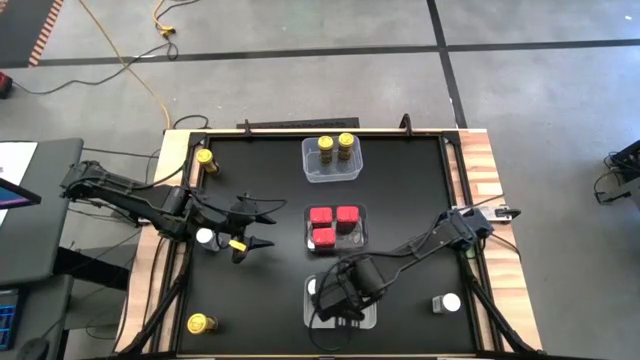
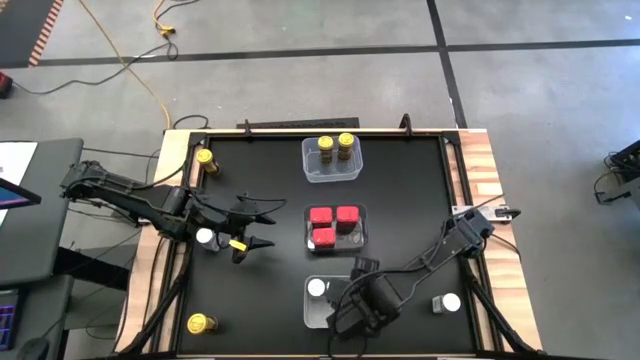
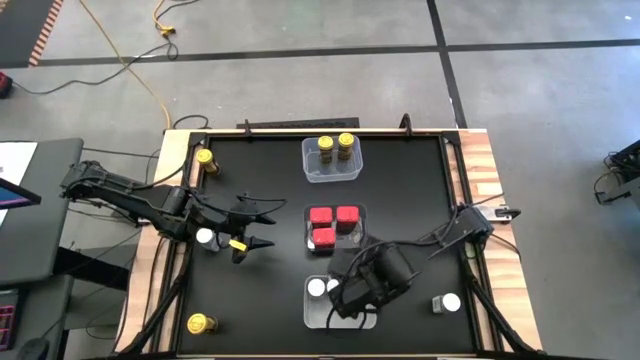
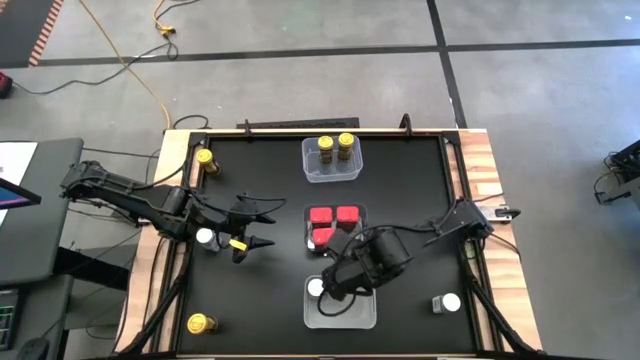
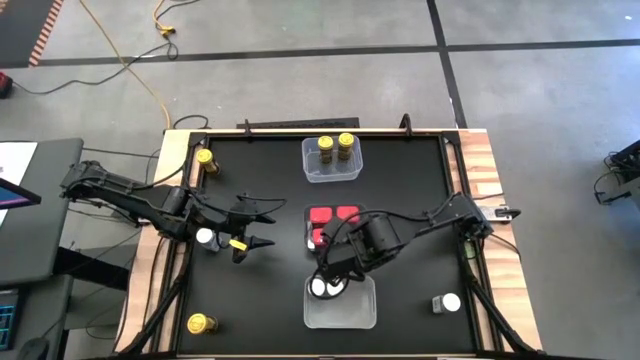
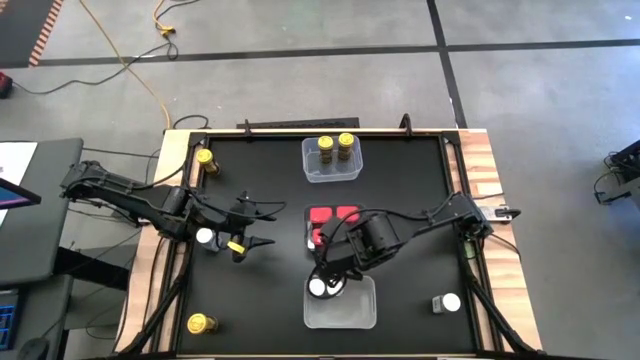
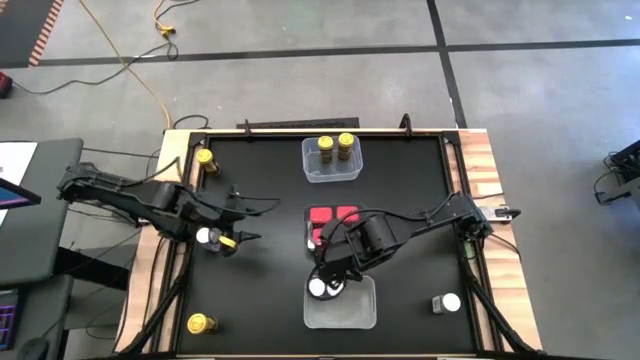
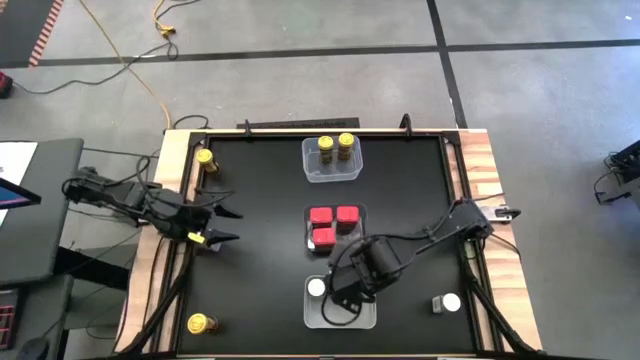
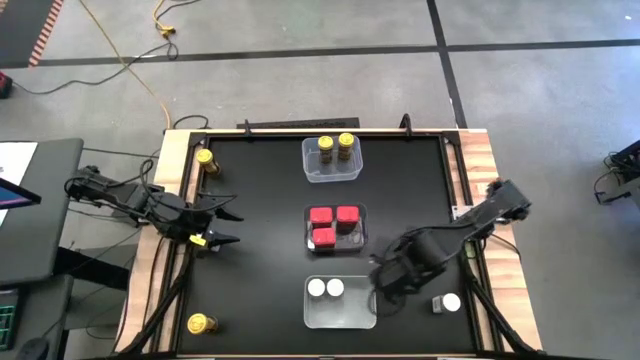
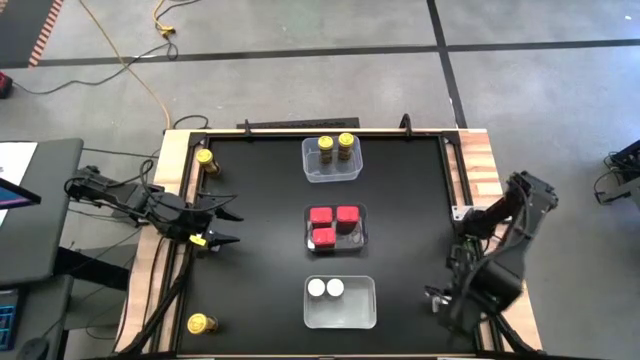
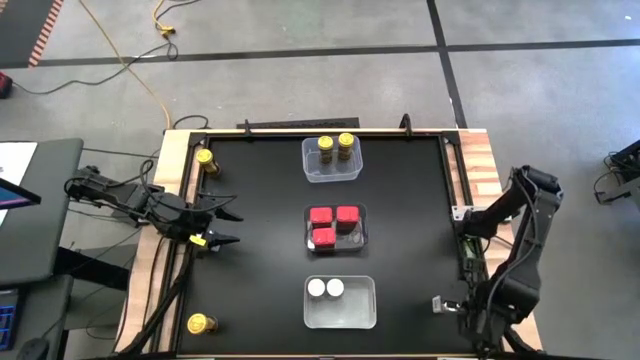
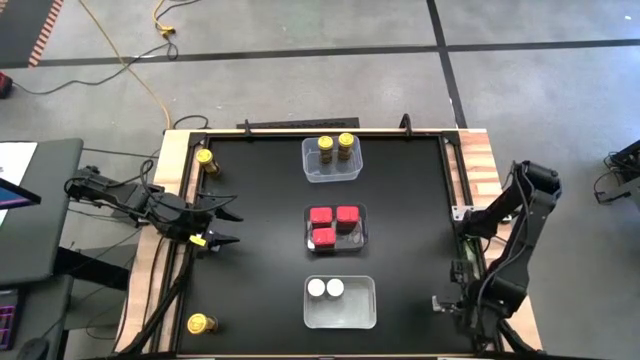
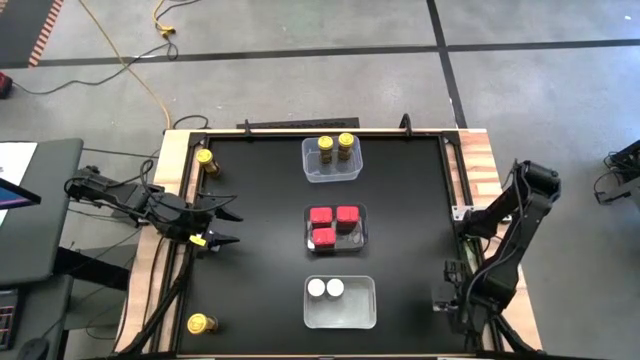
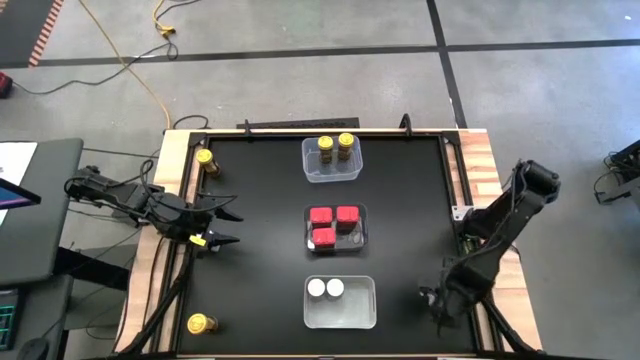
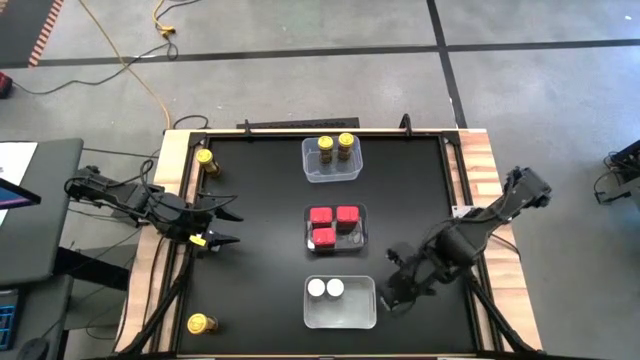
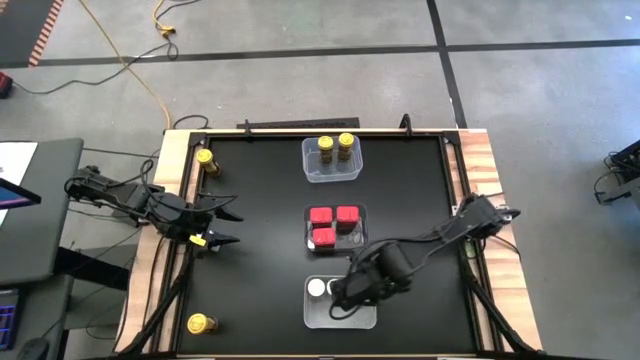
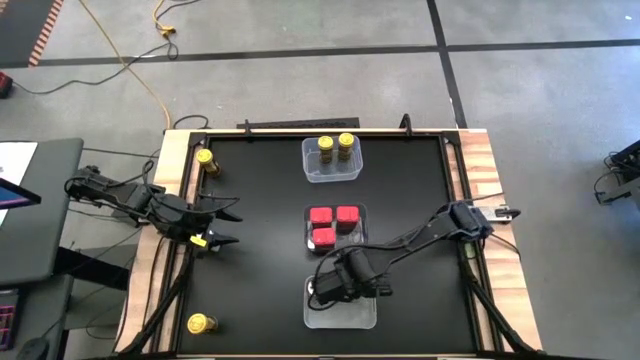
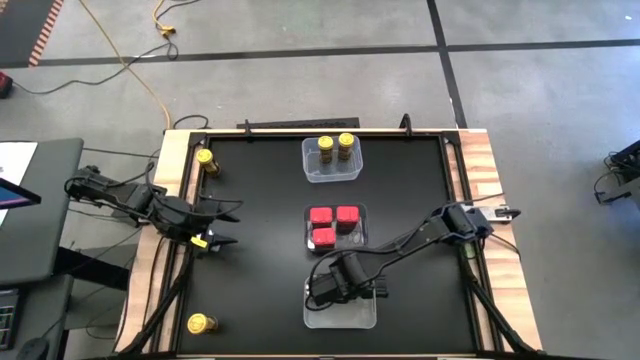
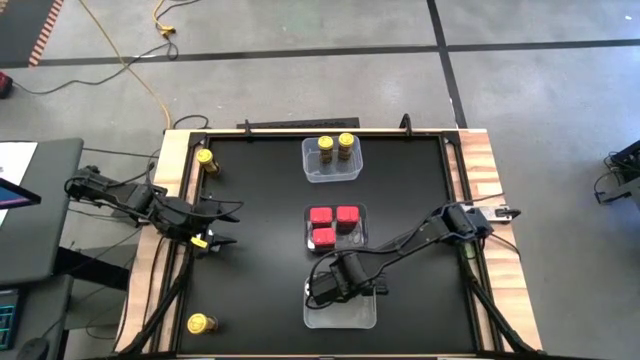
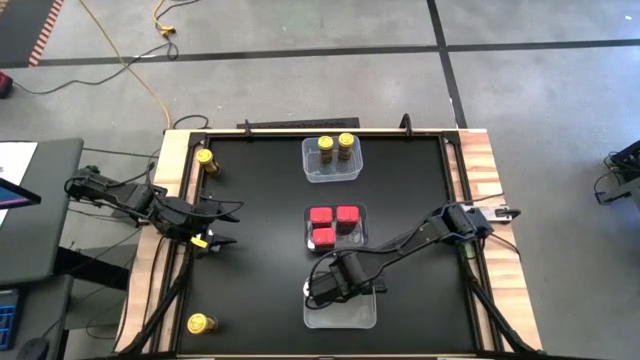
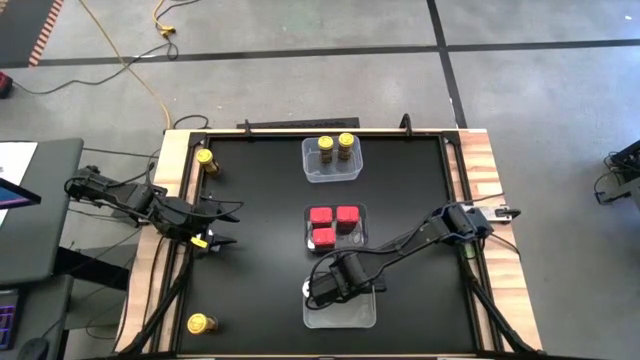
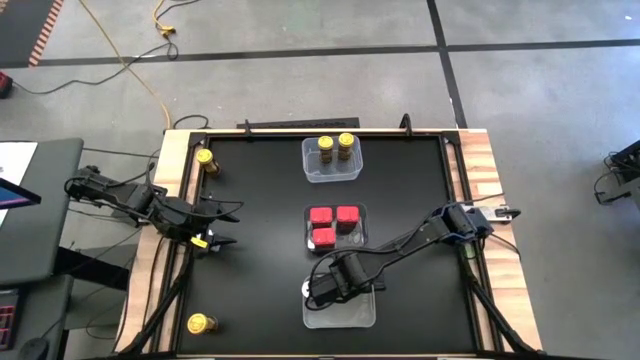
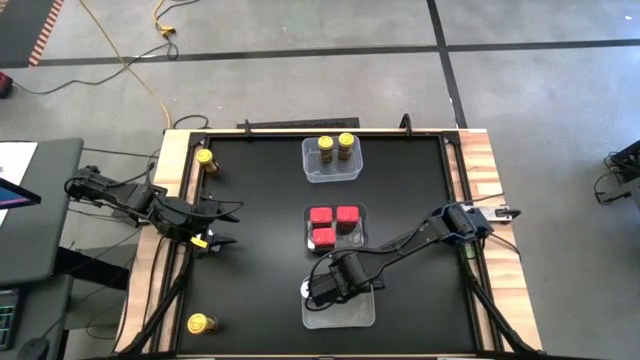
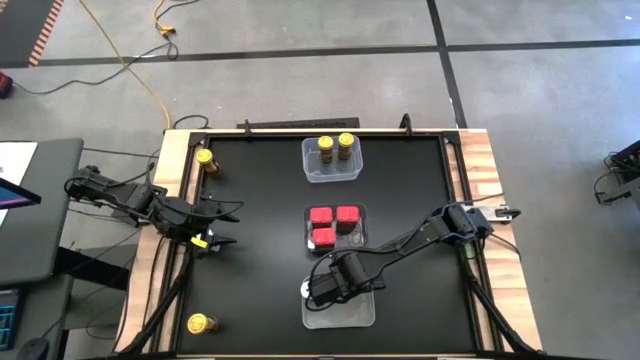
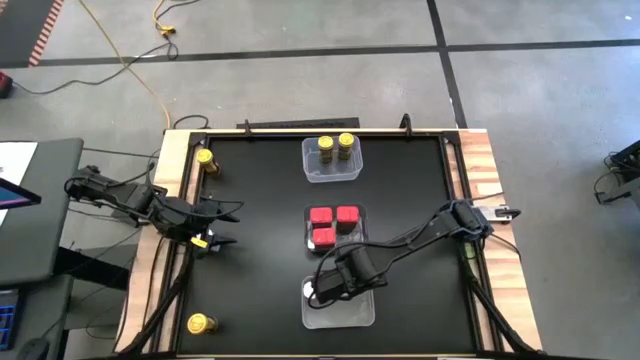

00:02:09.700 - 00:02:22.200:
Task: Sort spices by type
Put the right white seasoning bottle into the gray bin

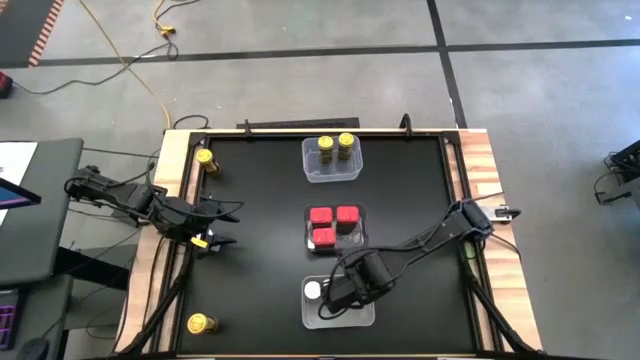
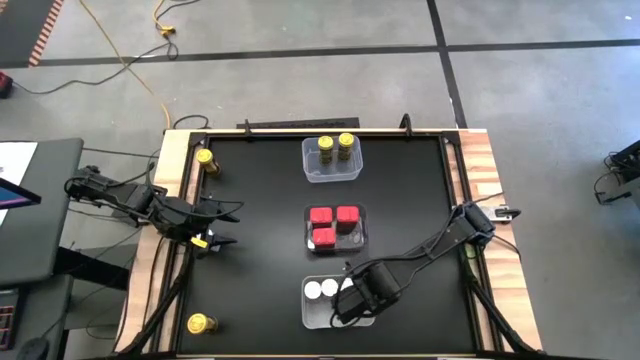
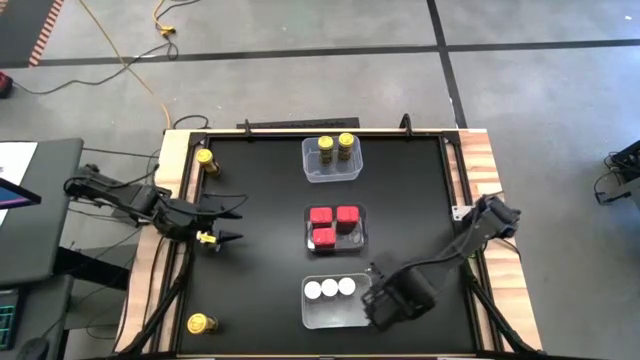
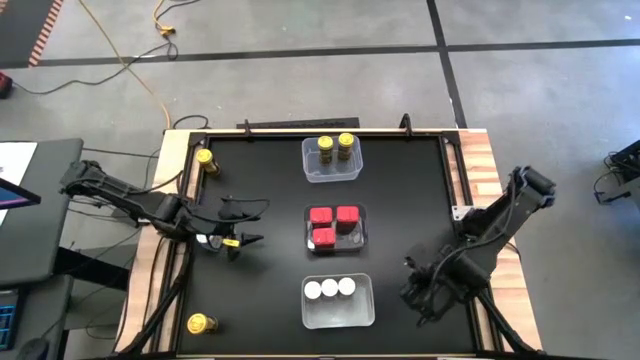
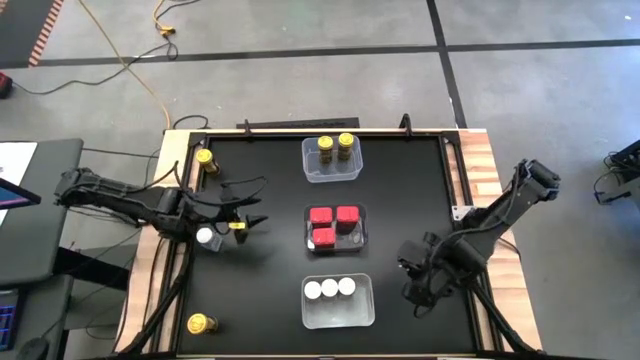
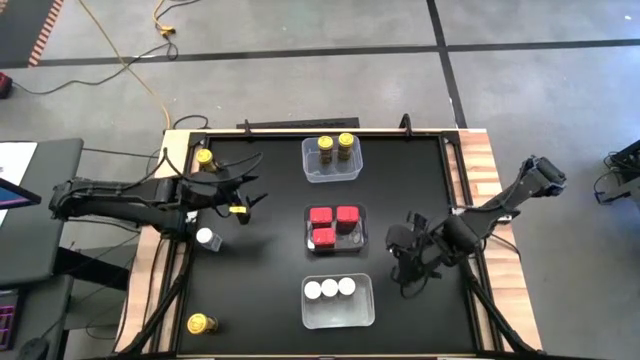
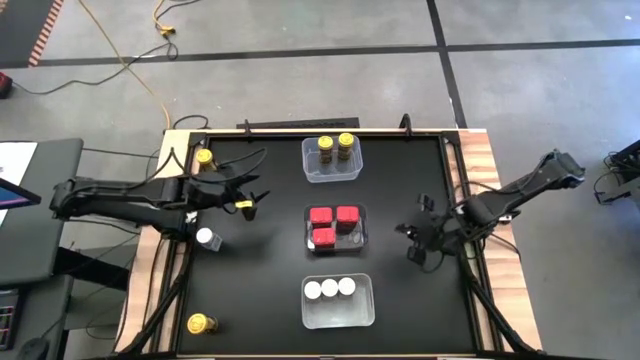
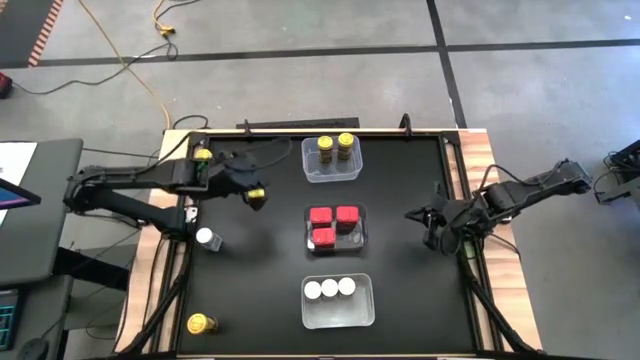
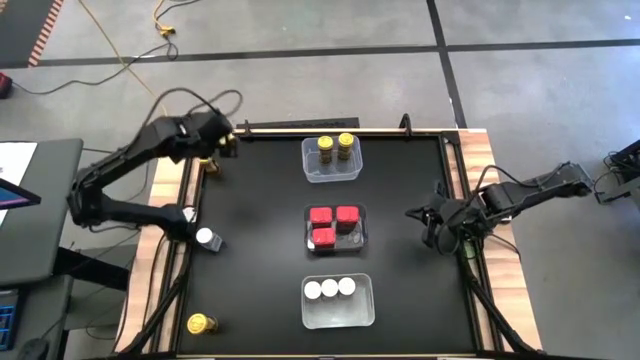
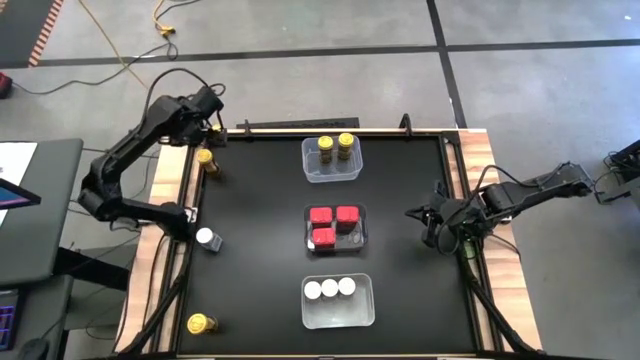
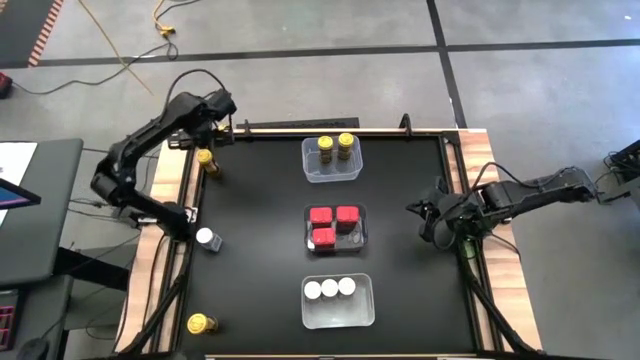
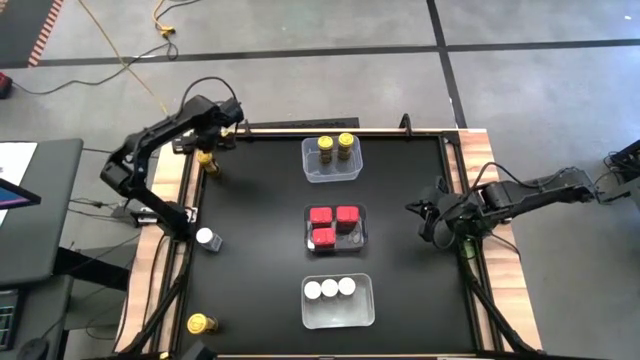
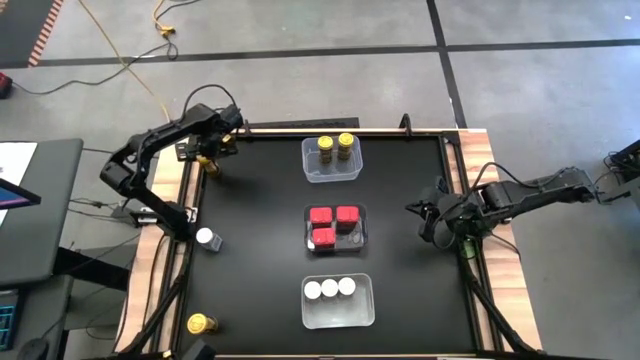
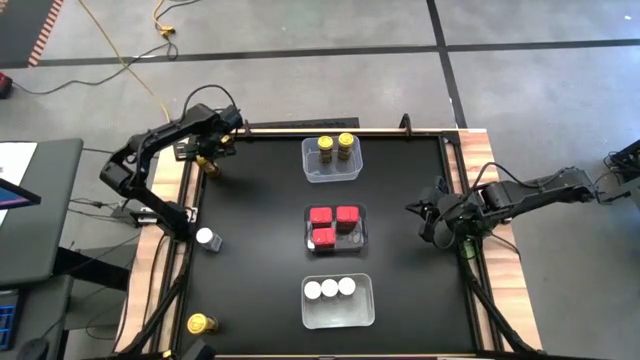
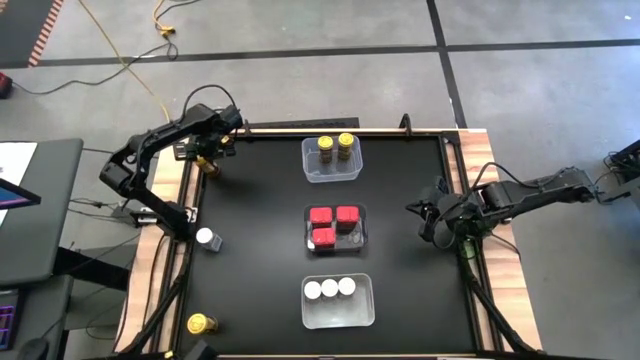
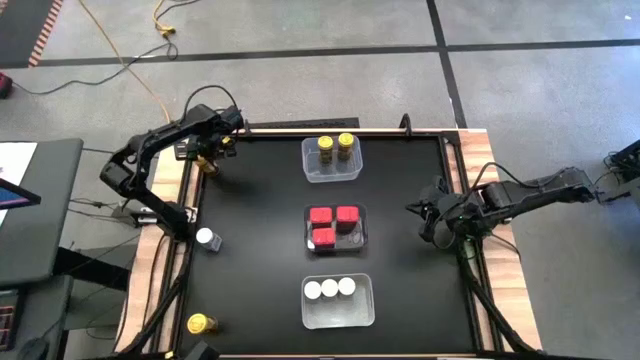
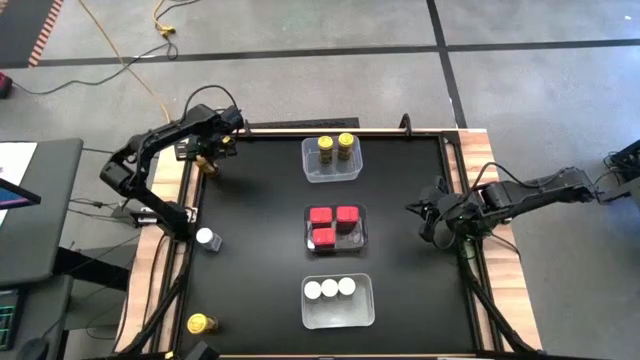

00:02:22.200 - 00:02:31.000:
Put the top yellow seasoning bottle into the transparent bin
